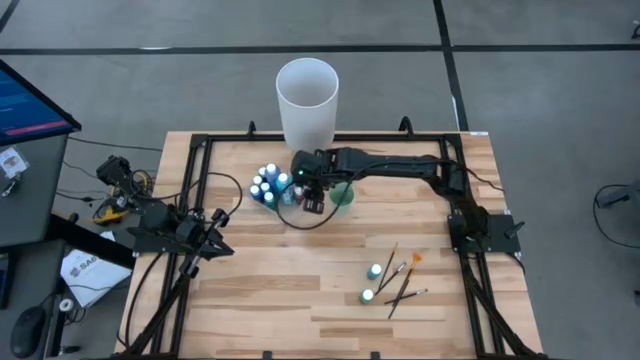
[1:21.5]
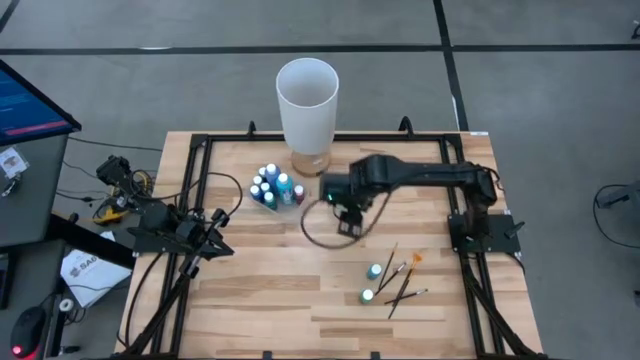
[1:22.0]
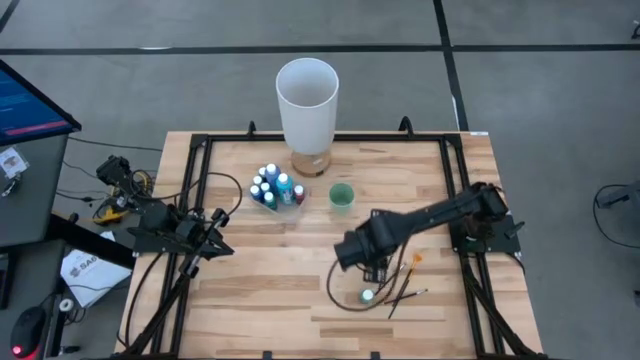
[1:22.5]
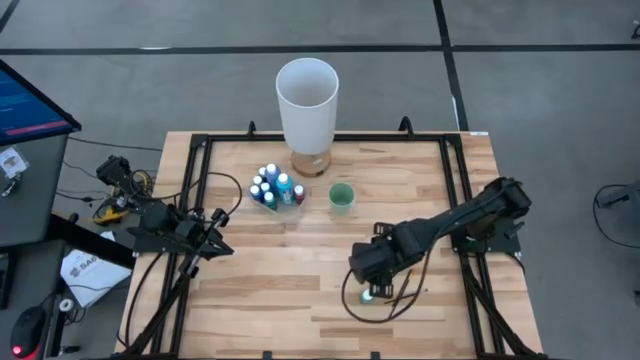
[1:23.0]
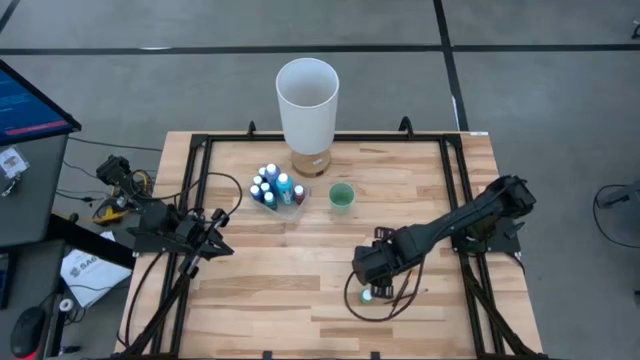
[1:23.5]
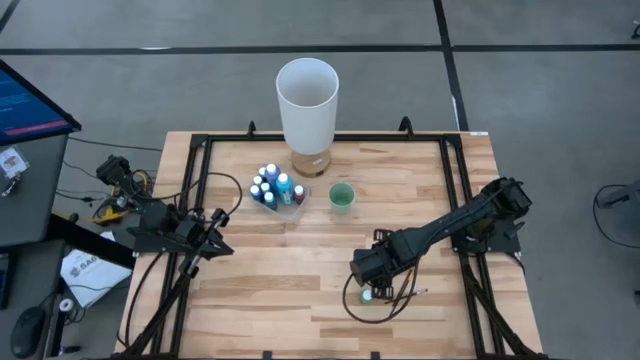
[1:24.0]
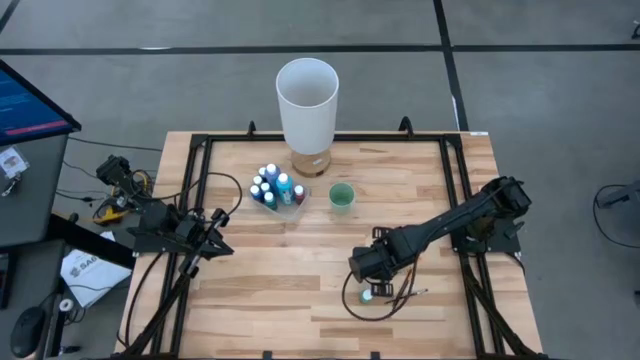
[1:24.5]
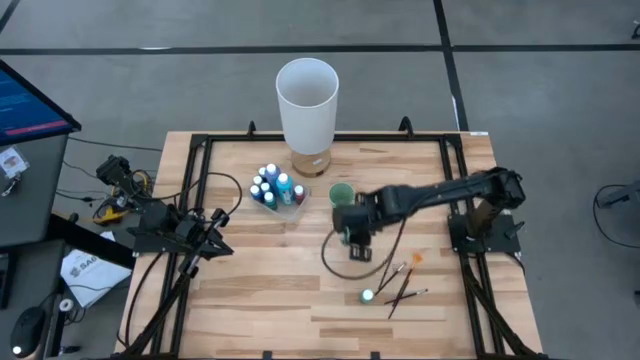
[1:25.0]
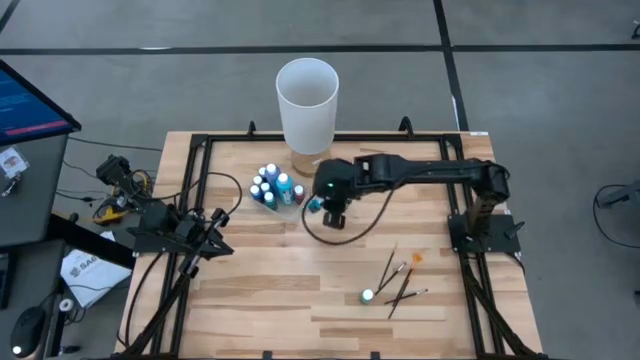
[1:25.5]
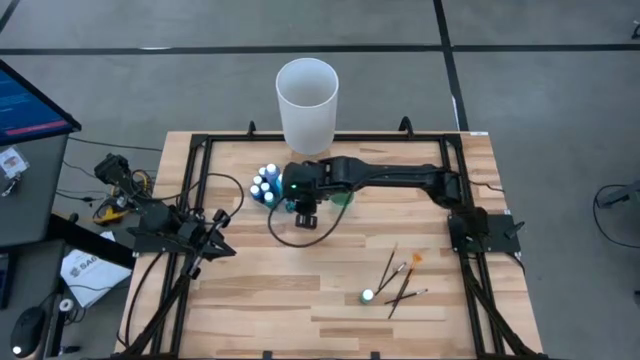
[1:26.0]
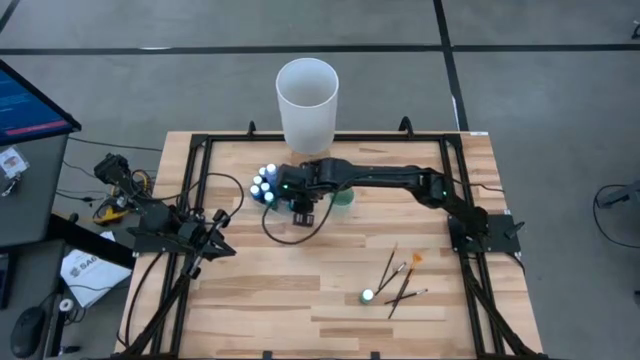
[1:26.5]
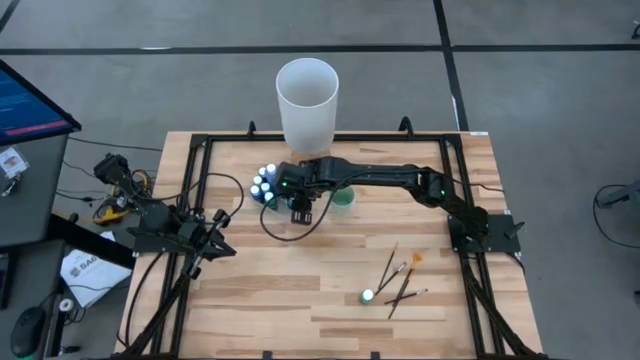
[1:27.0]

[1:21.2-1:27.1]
Task: Pick & Place Paint Supplies
Put the light blue paint bottle into the transparent bin

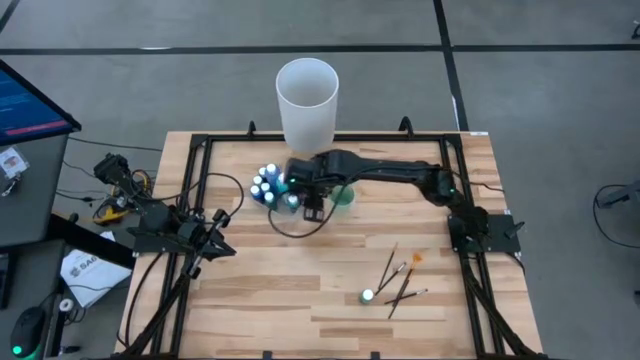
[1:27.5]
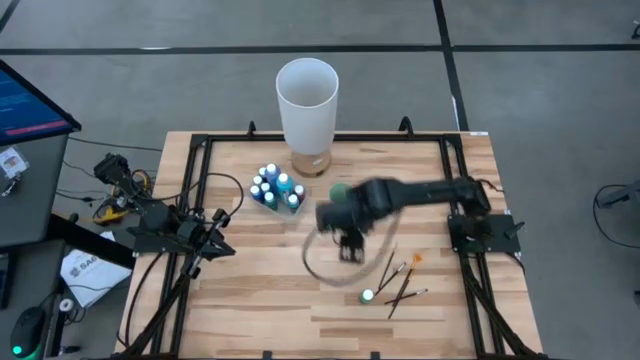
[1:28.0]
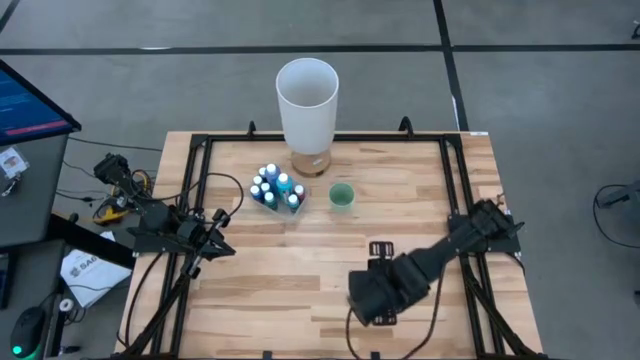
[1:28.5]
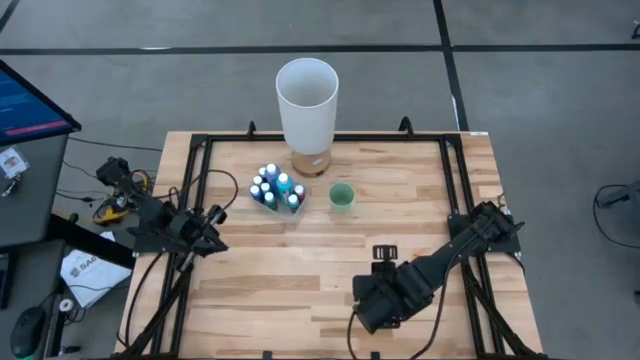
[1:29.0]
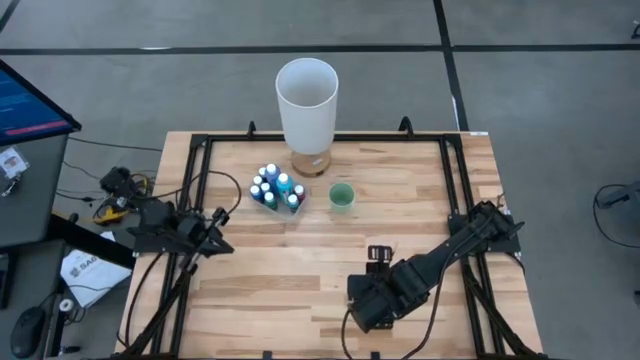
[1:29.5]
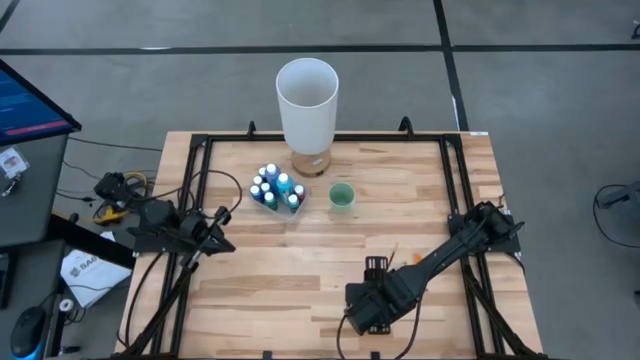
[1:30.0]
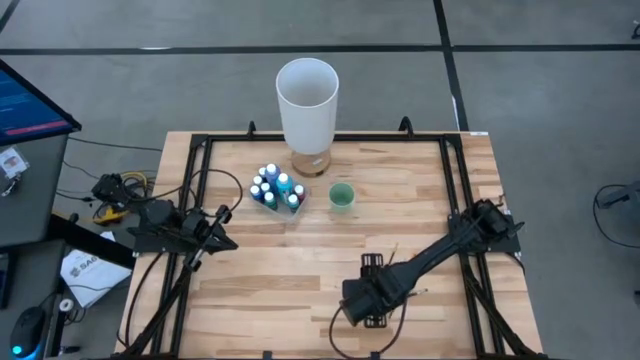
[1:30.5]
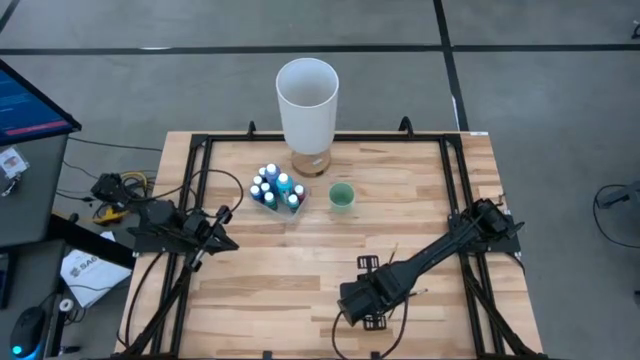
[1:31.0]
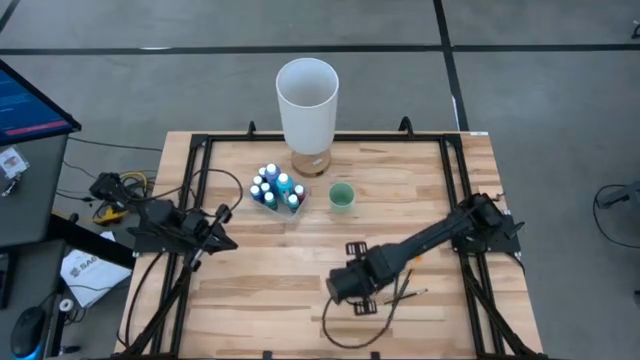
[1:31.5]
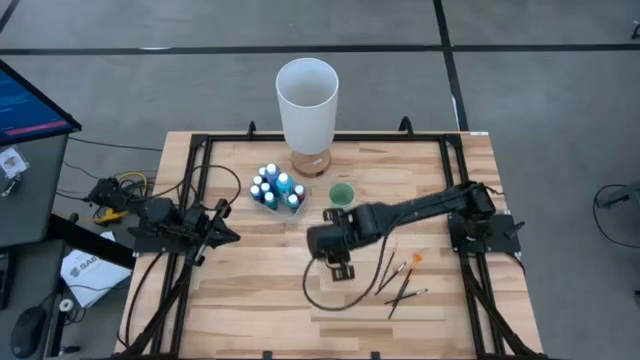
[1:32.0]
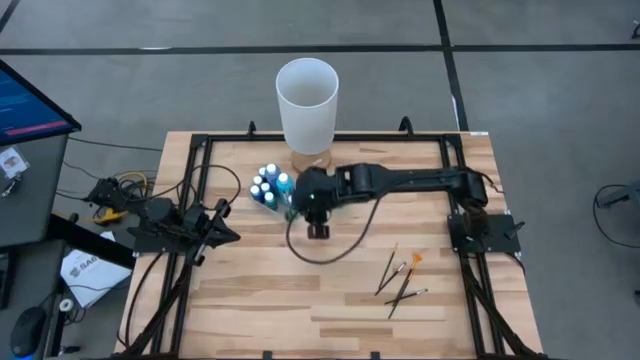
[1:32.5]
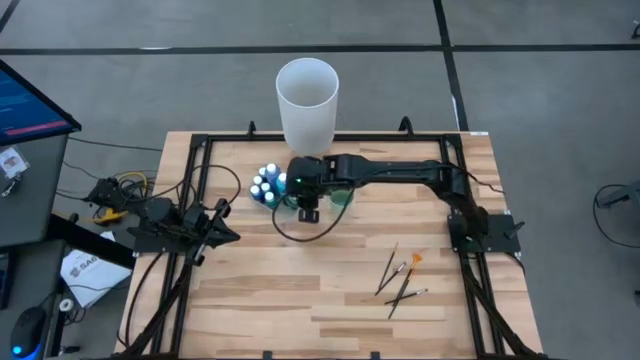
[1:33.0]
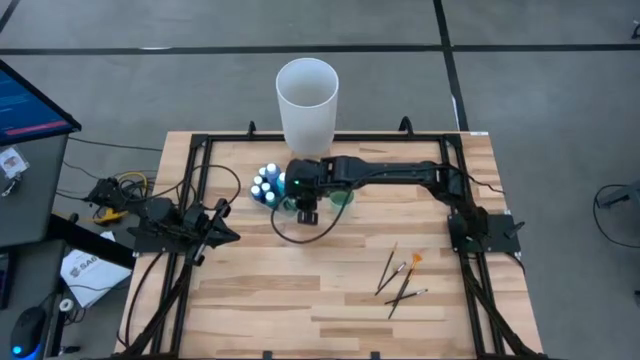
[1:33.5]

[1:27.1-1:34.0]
Put the green paint bottle into the transparent bin

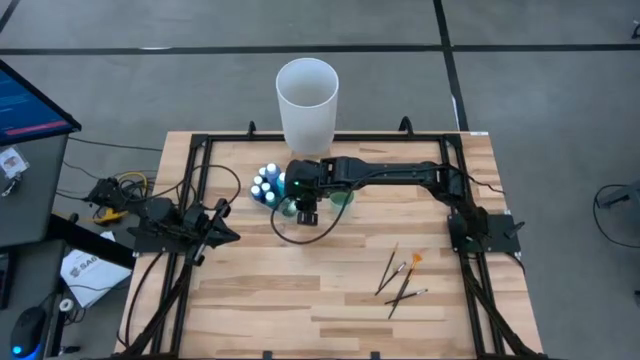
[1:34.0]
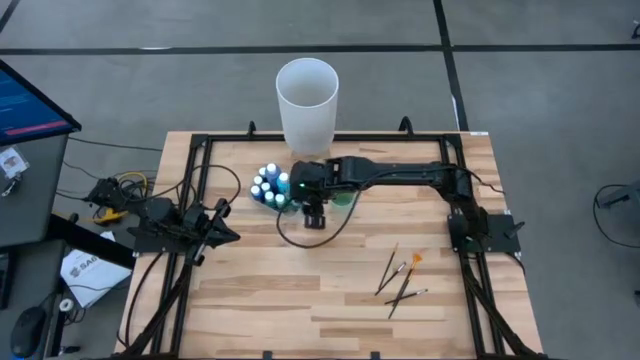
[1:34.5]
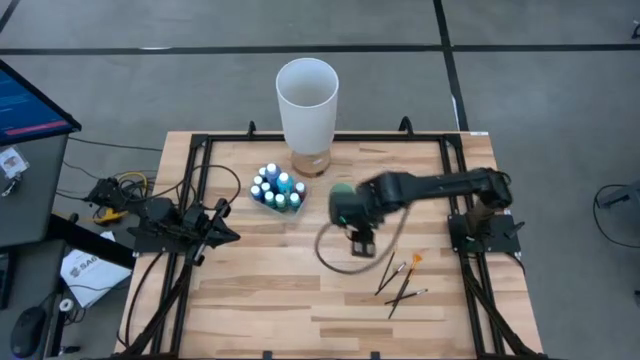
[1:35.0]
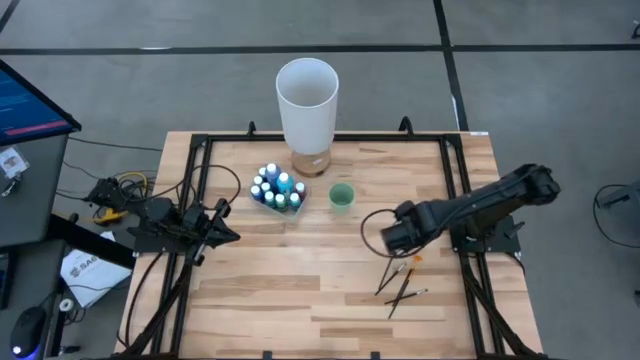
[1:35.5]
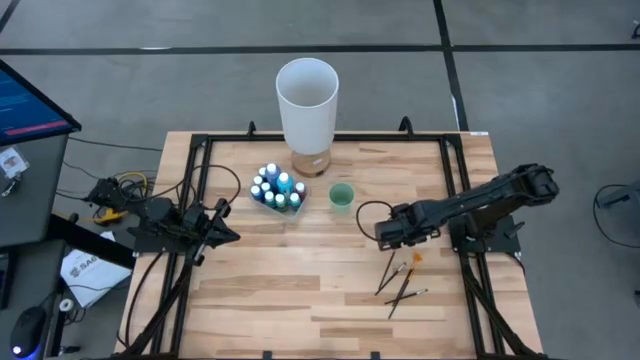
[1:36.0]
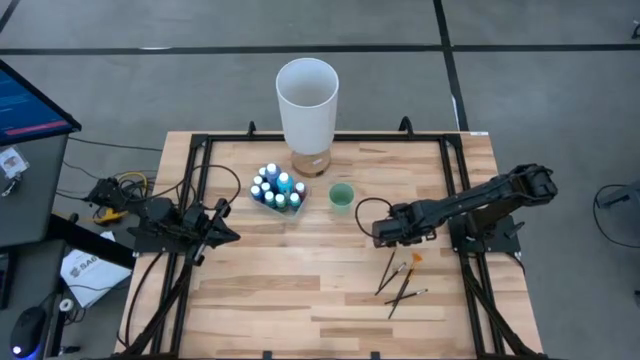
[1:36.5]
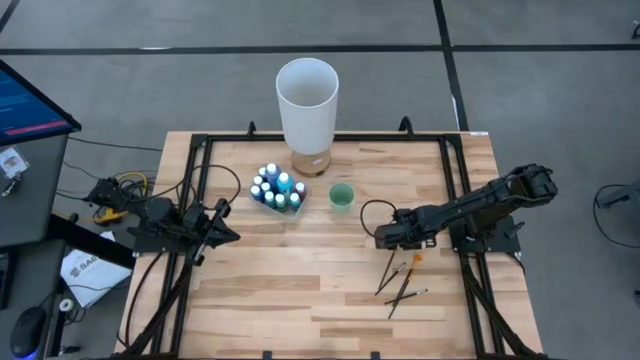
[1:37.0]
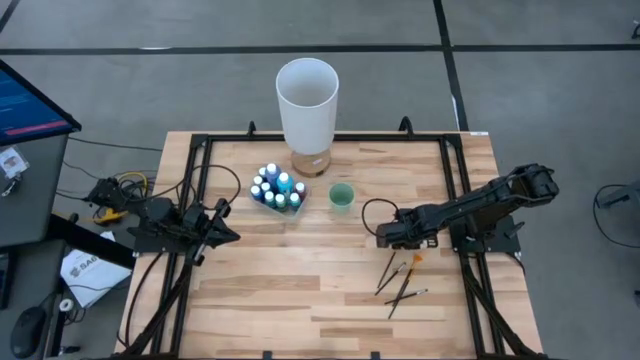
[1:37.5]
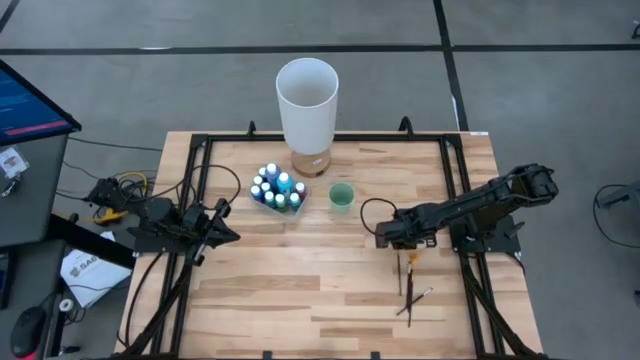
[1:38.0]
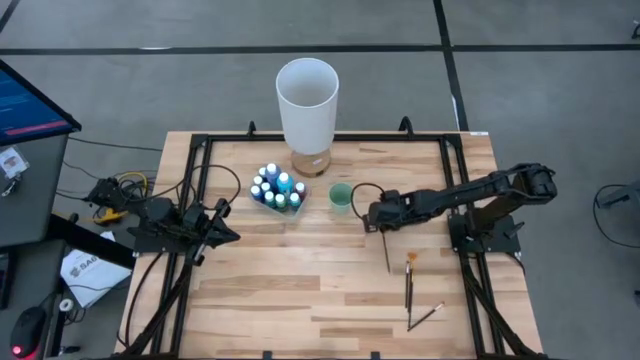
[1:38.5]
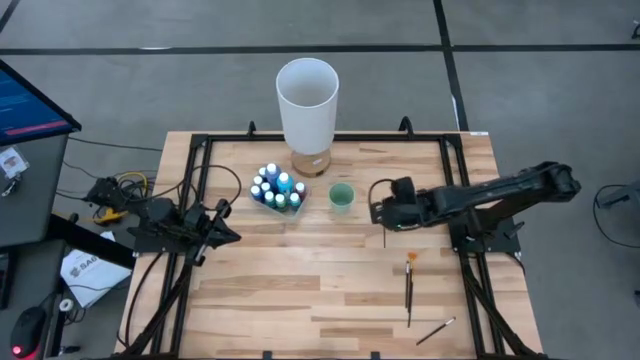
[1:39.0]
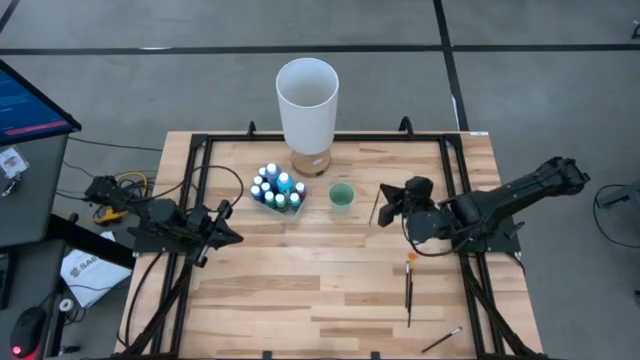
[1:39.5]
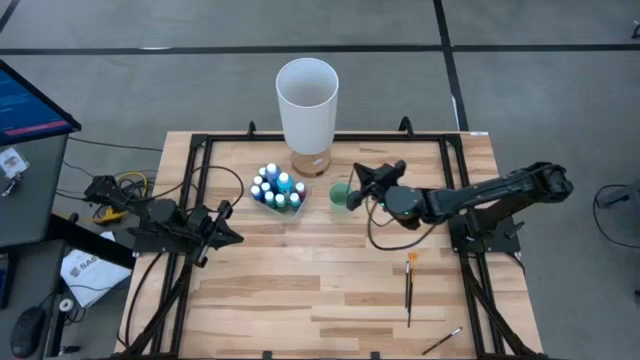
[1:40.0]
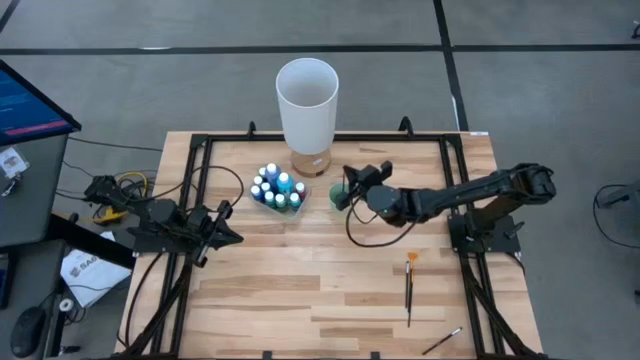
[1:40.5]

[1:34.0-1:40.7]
Put the top gold paint brush into the green cup

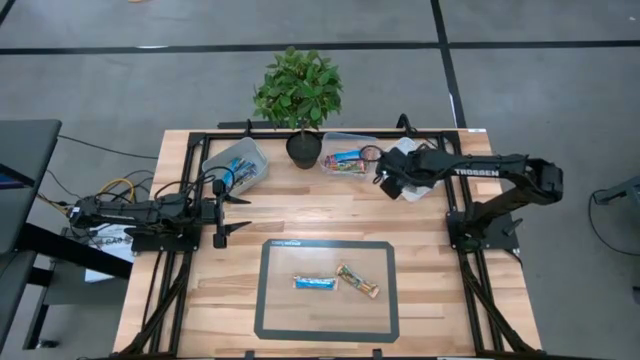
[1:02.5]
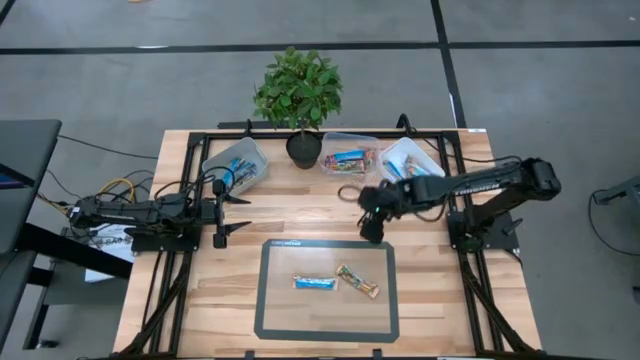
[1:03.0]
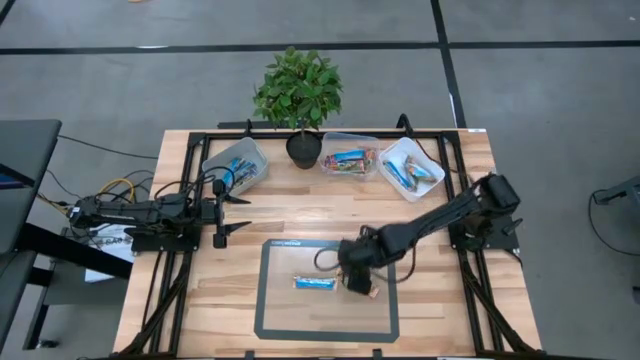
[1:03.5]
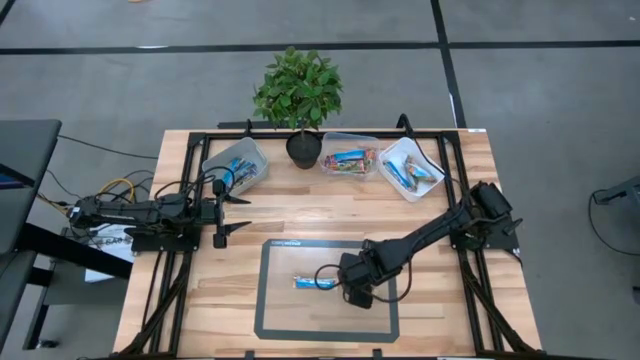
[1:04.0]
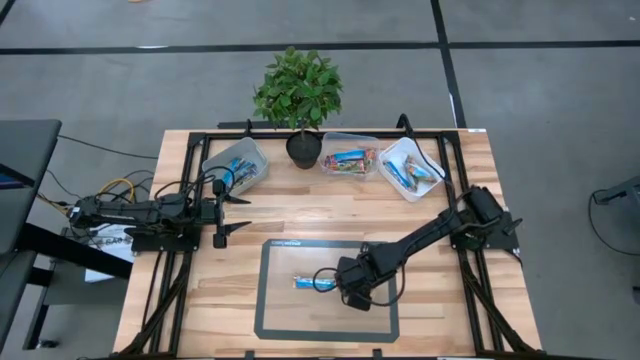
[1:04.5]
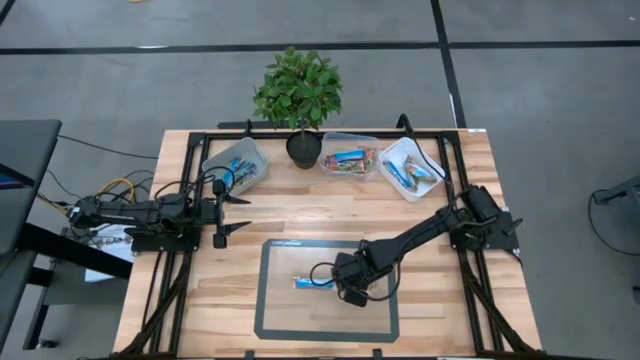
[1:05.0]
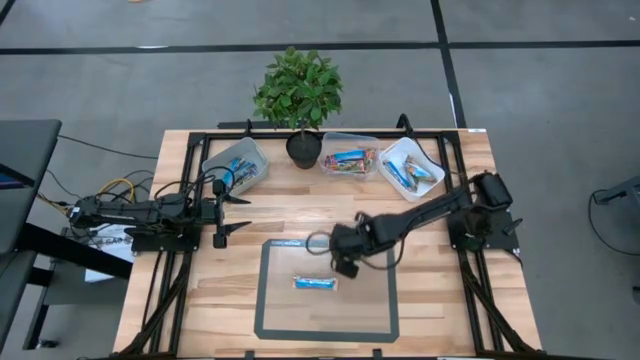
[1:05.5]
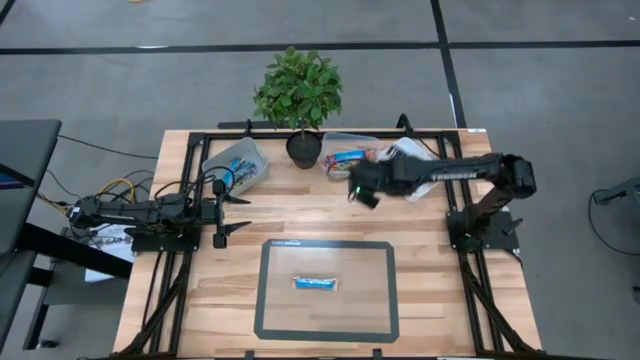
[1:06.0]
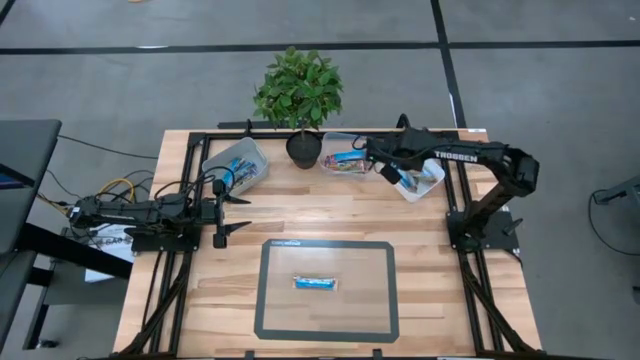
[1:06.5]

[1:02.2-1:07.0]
Task: Pick and place Granola Bars by type
Put the yellow granola bar into the white bin
